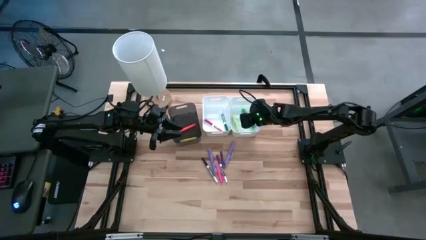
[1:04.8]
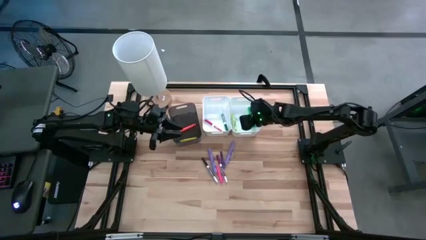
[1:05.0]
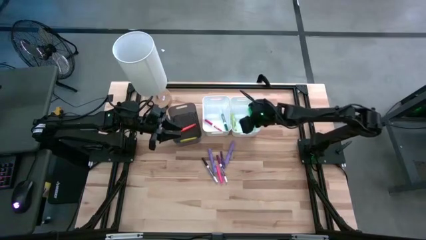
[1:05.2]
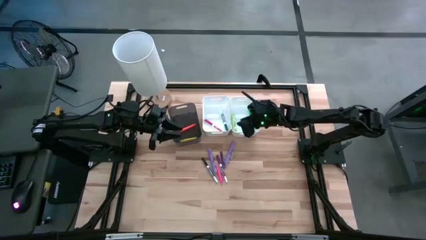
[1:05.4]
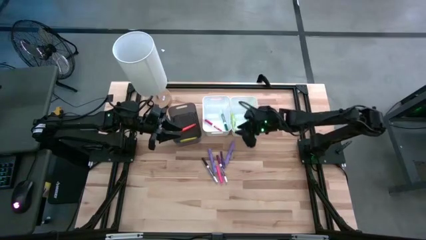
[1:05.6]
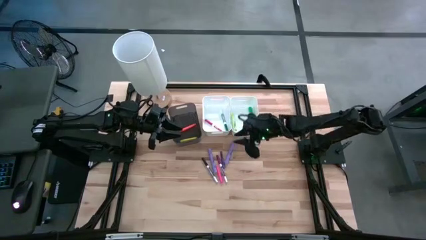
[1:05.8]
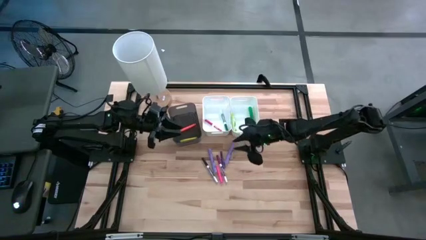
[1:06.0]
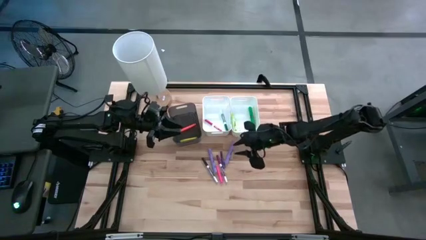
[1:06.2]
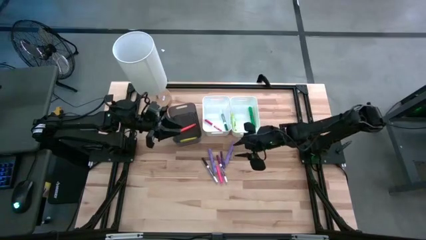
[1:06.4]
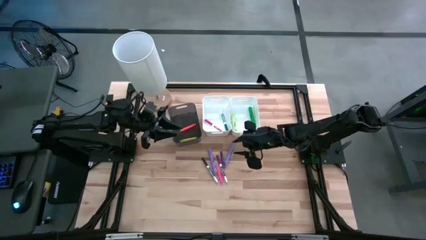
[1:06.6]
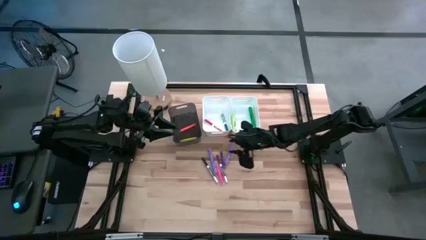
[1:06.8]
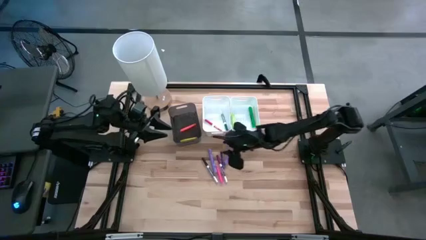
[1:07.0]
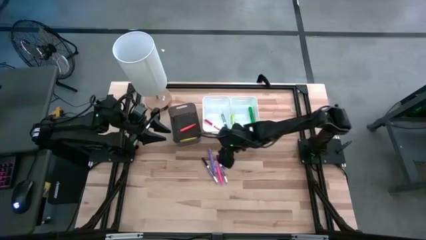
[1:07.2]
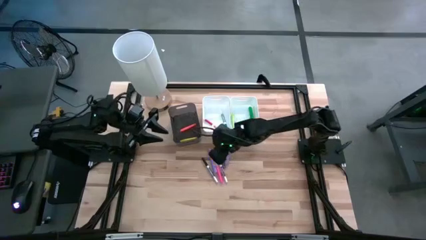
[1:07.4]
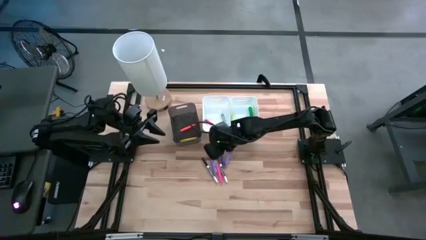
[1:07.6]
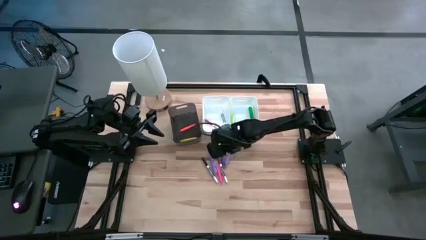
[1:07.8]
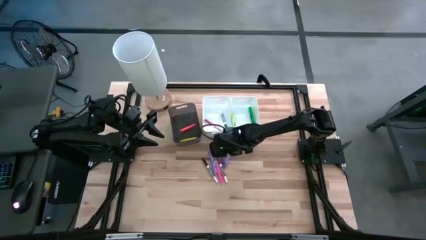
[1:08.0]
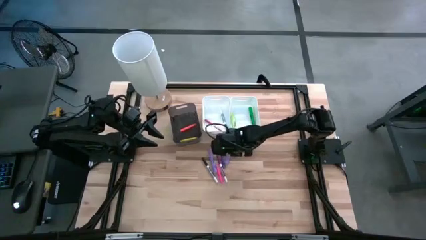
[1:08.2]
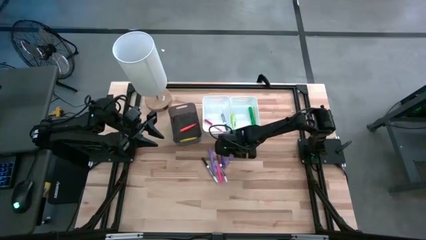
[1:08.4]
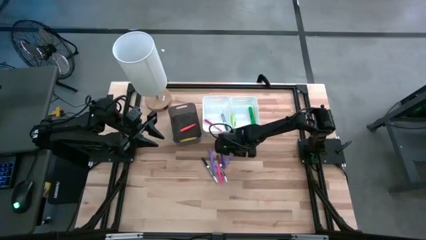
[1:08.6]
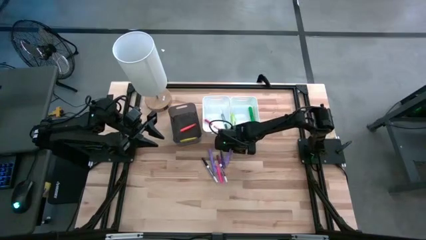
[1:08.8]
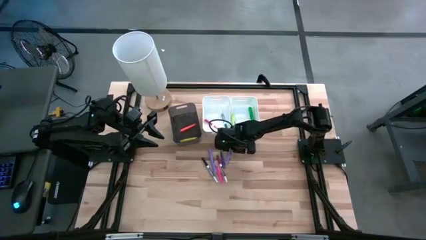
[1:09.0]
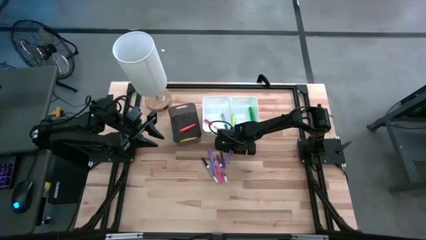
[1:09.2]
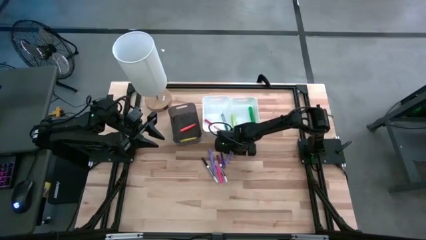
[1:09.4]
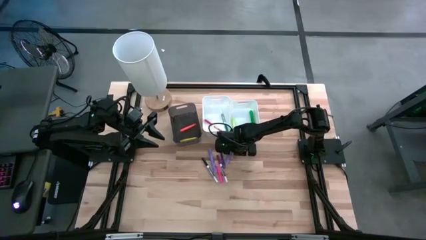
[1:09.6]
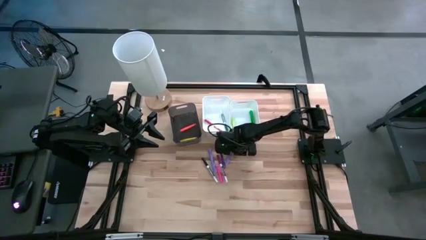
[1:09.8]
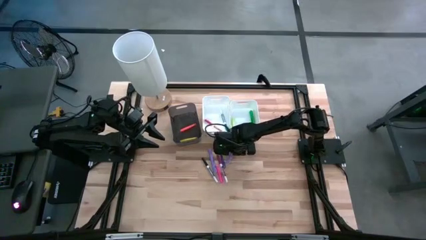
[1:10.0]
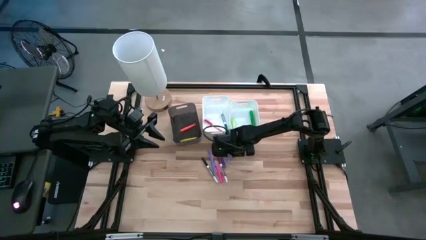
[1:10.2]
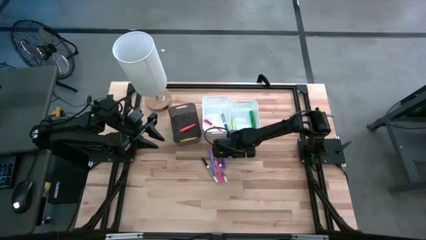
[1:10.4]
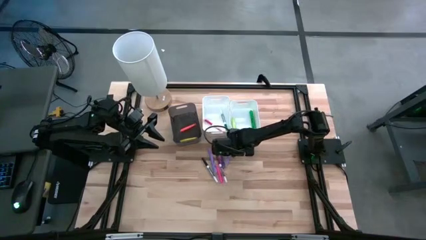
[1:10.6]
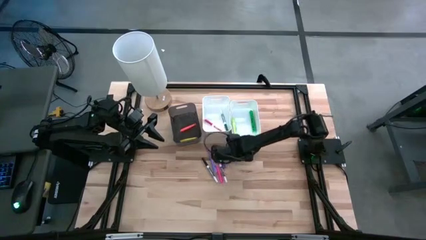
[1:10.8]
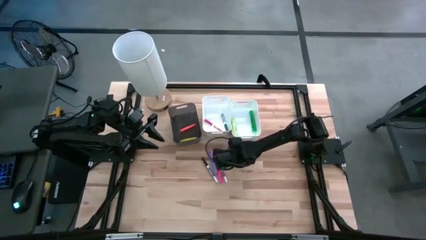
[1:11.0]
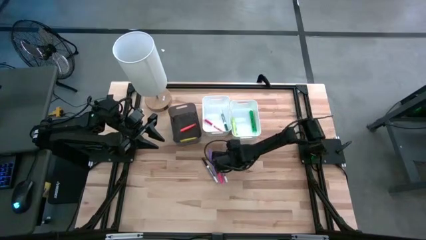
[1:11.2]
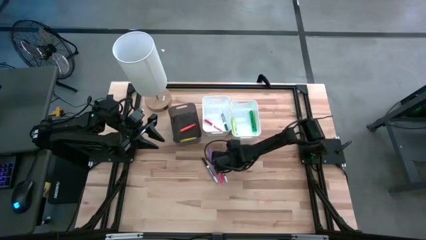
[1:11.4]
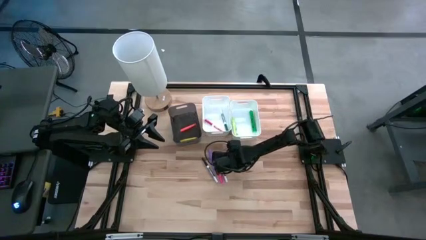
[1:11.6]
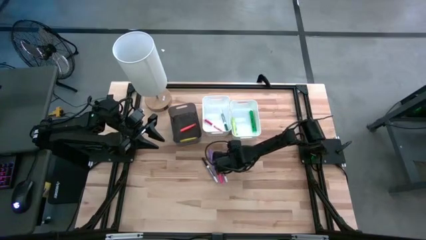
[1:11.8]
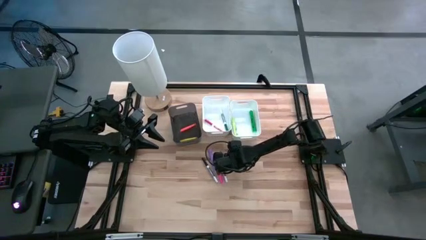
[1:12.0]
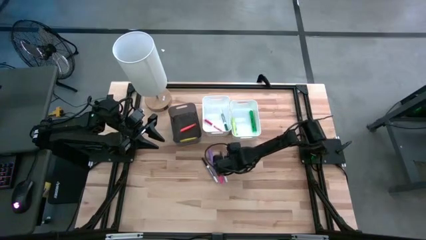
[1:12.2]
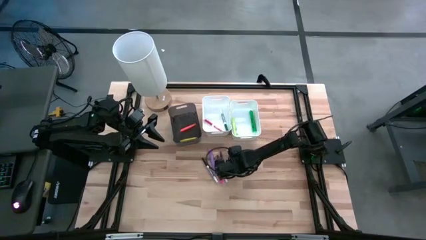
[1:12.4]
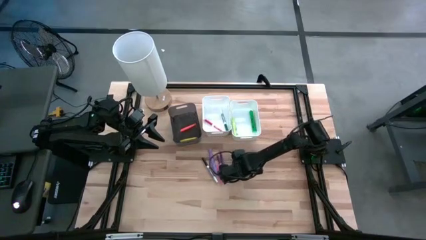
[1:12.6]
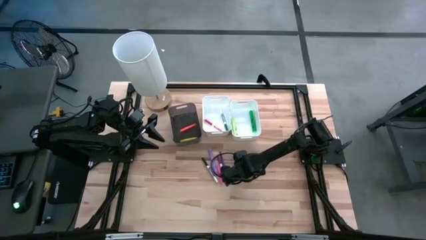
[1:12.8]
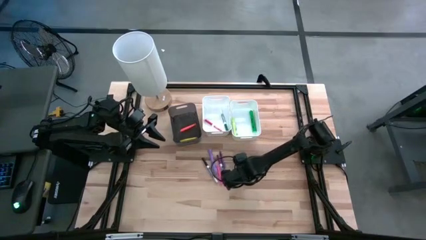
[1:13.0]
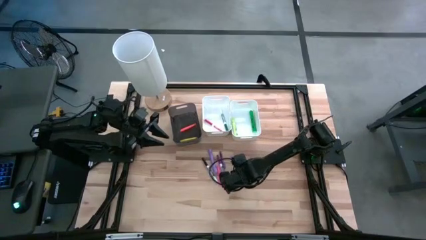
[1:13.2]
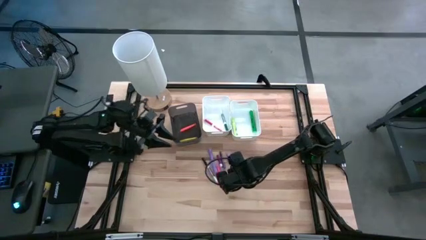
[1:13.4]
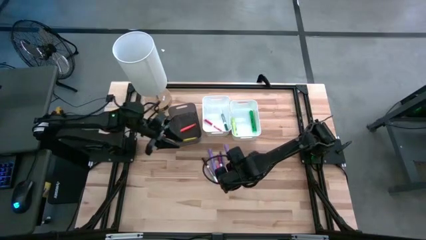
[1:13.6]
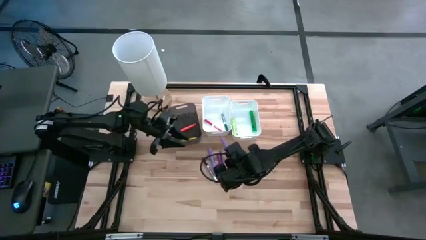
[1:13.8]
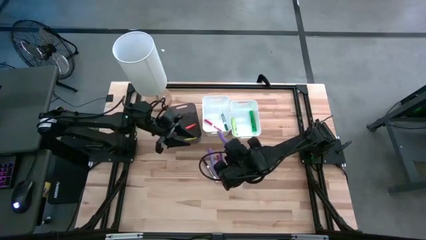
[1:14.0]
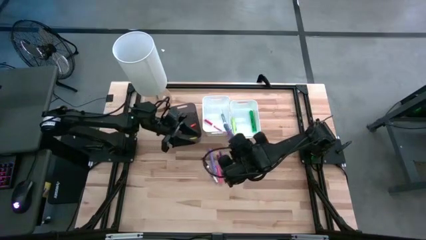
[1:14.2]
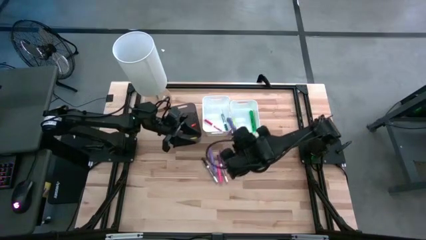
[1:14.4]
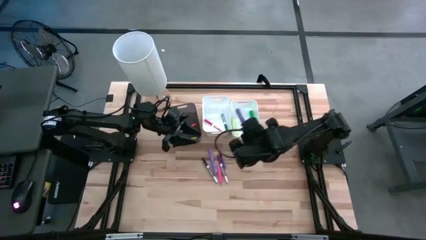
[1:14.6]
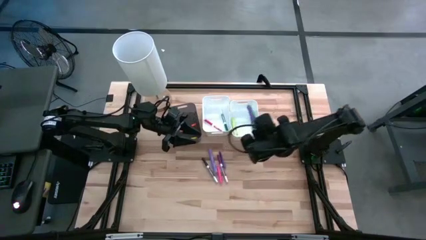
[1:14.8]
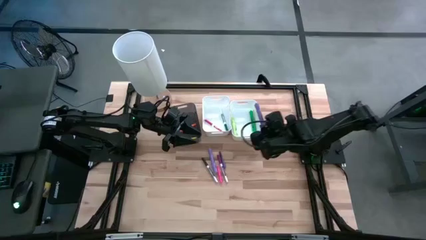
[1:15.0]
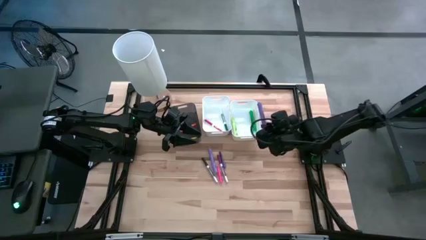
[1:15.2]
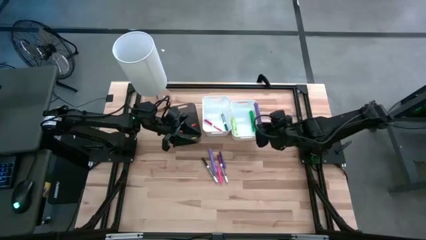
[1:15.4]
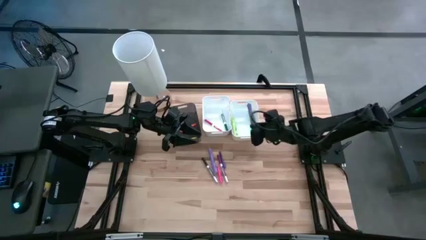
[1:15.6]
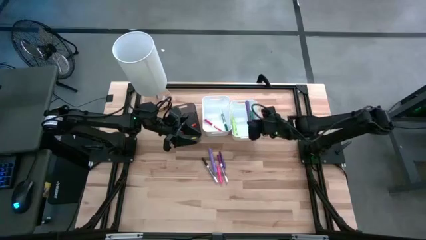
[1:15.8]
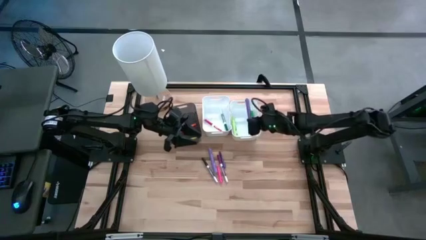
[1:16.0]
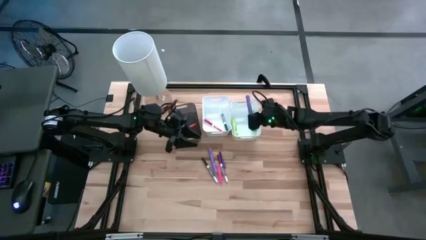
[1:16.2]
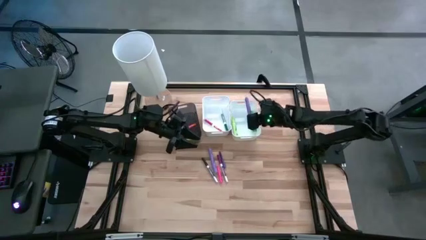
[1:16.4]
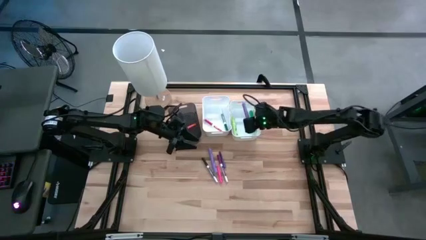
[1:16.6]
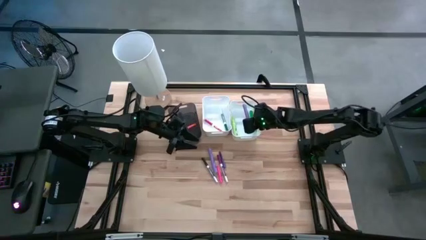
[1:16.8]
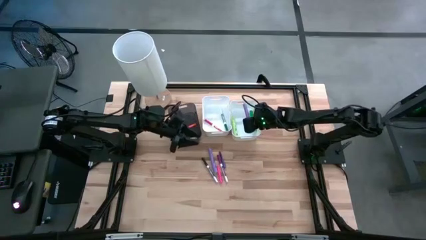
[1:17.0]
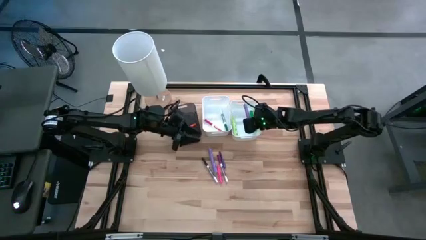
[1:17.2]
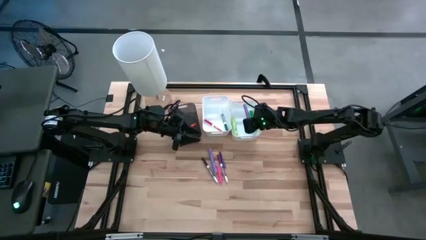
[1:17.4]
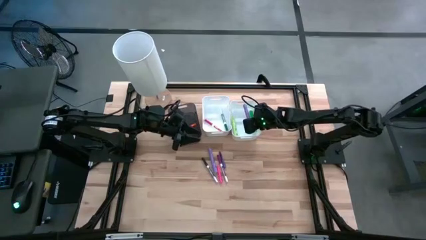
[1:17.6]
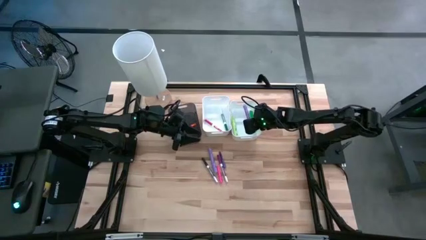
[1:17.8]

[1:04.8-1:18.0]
Task: Pick & Place Markers
Put the right purple highlighter pen into the right white bin
